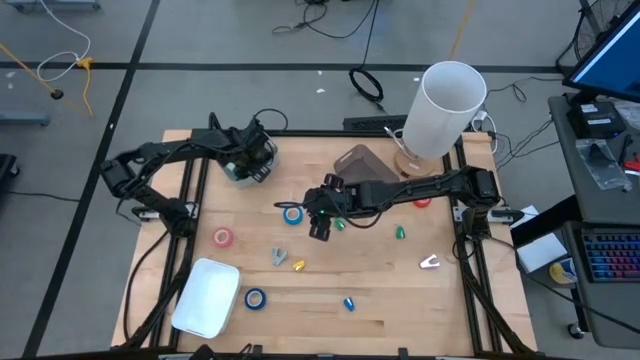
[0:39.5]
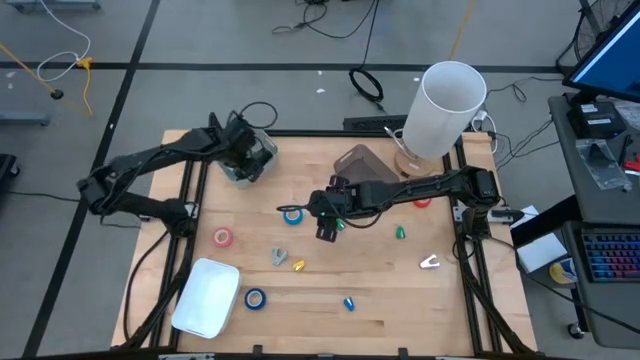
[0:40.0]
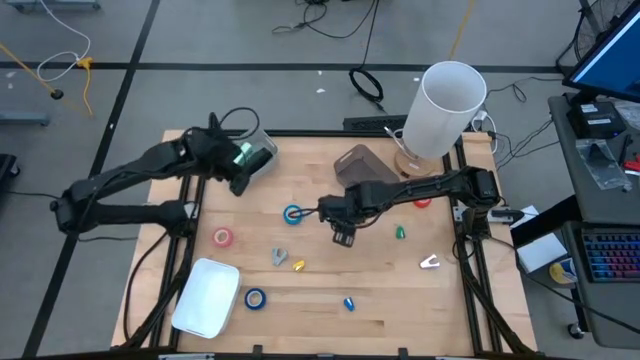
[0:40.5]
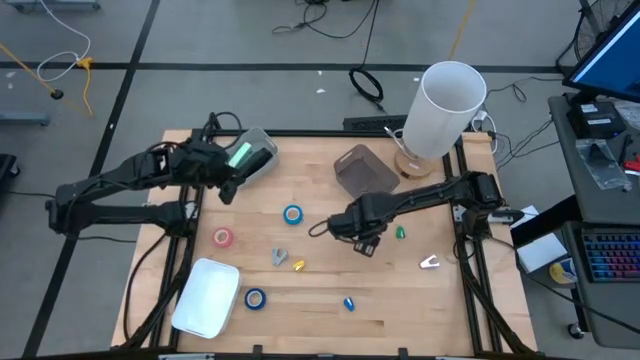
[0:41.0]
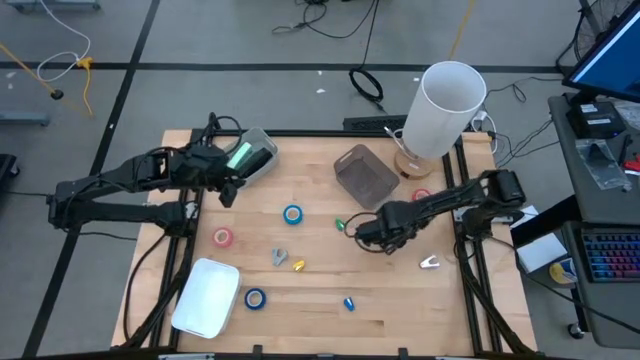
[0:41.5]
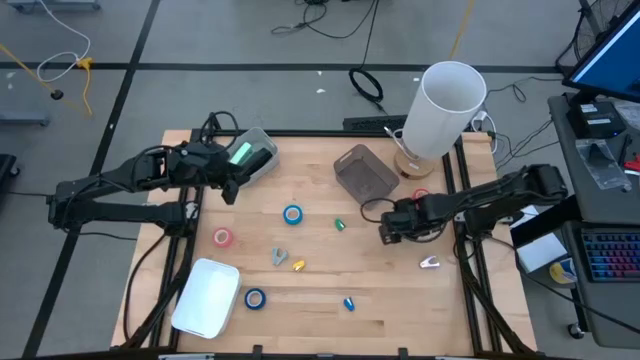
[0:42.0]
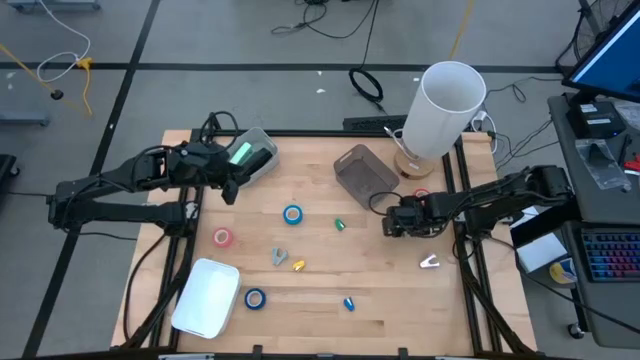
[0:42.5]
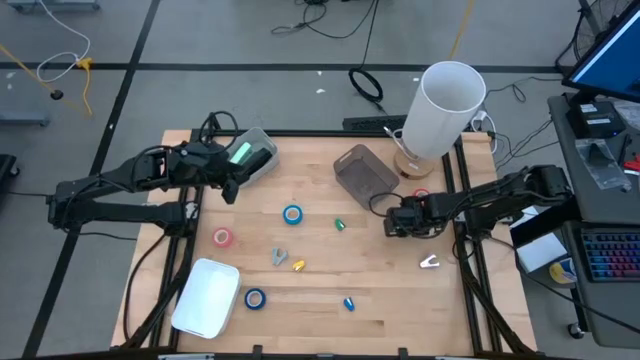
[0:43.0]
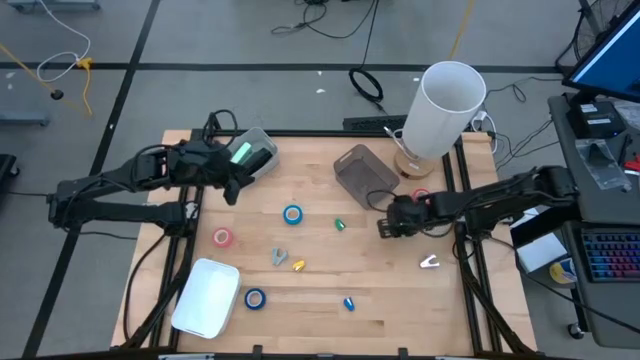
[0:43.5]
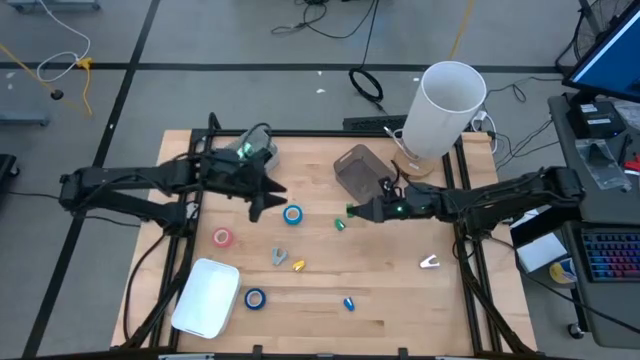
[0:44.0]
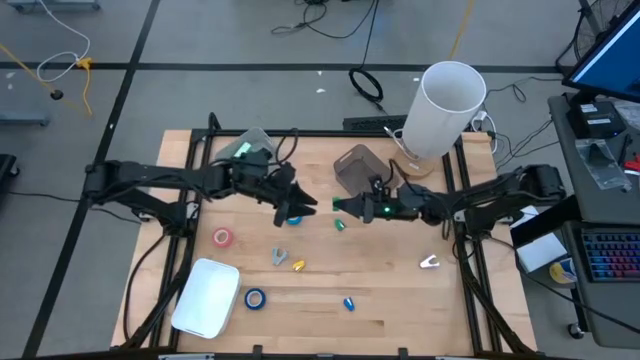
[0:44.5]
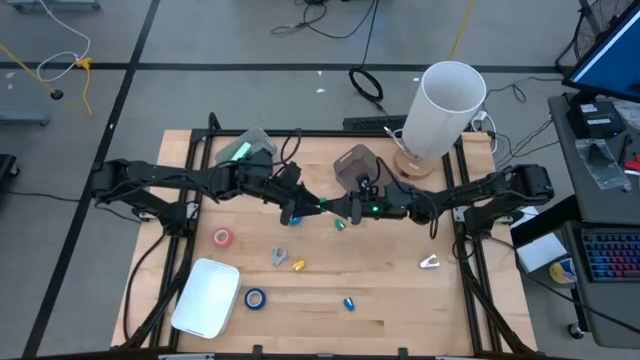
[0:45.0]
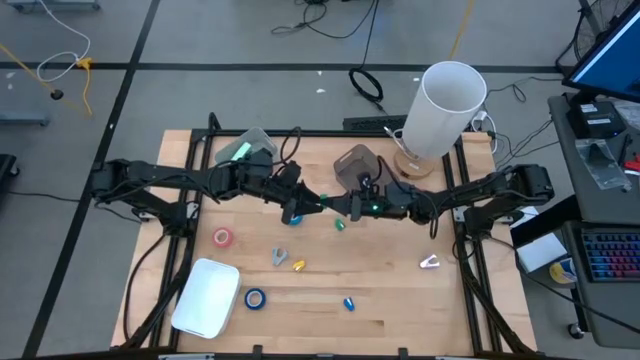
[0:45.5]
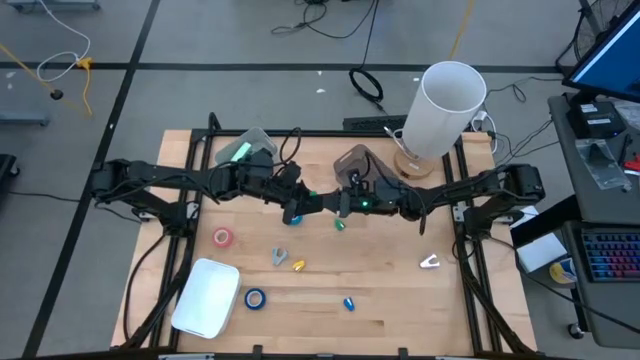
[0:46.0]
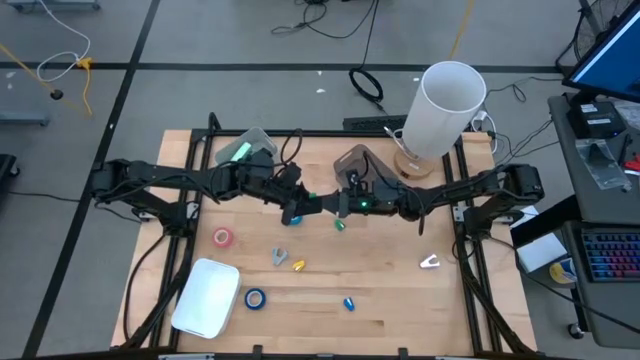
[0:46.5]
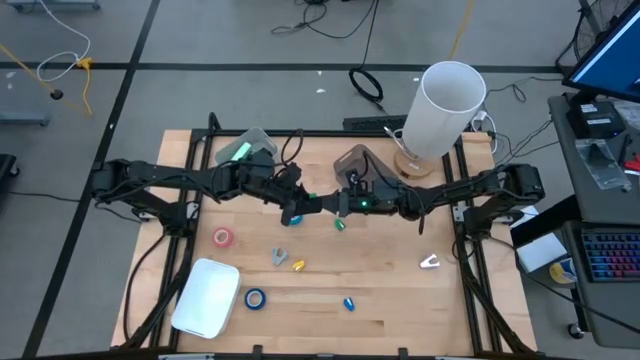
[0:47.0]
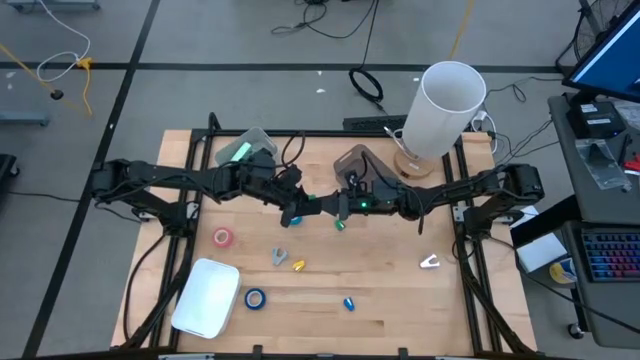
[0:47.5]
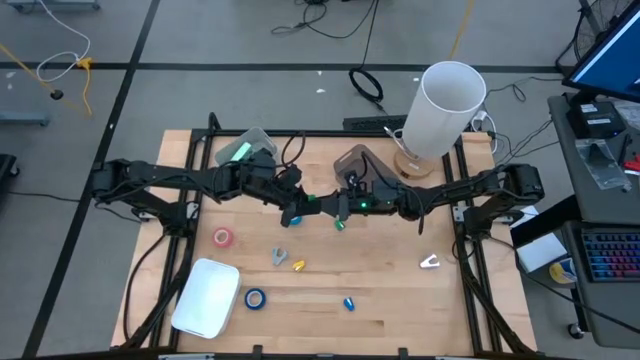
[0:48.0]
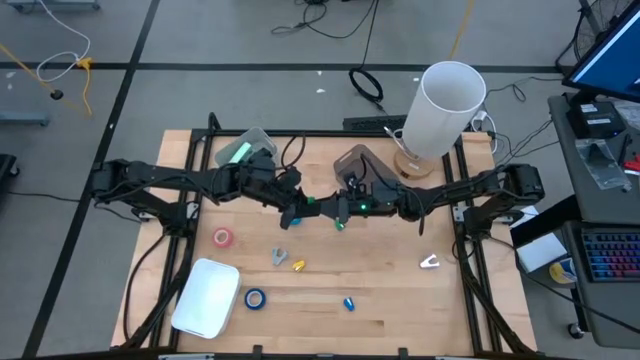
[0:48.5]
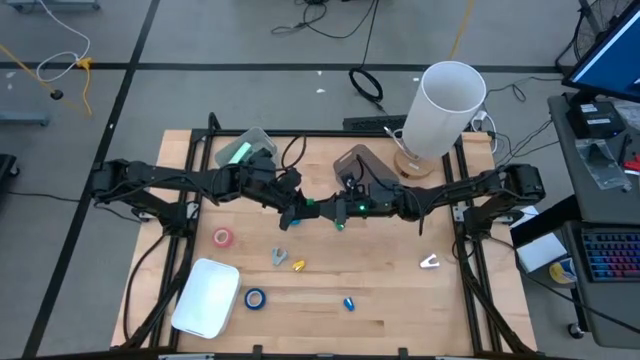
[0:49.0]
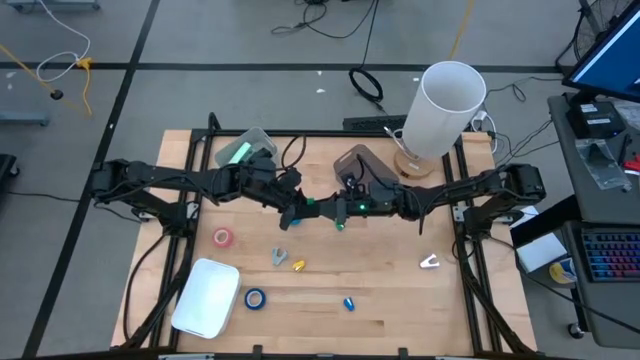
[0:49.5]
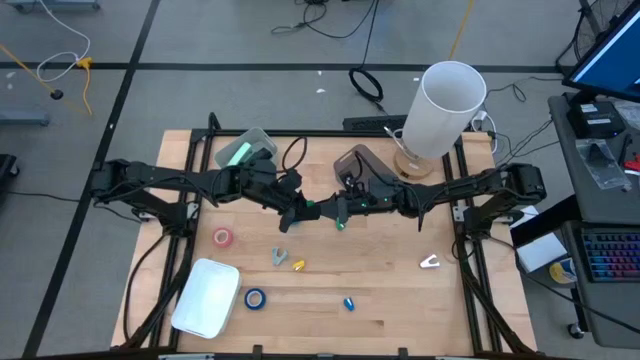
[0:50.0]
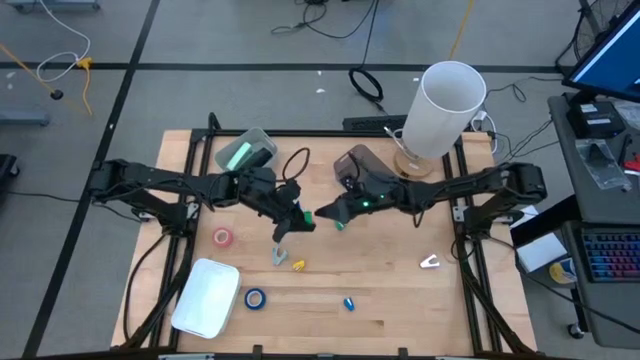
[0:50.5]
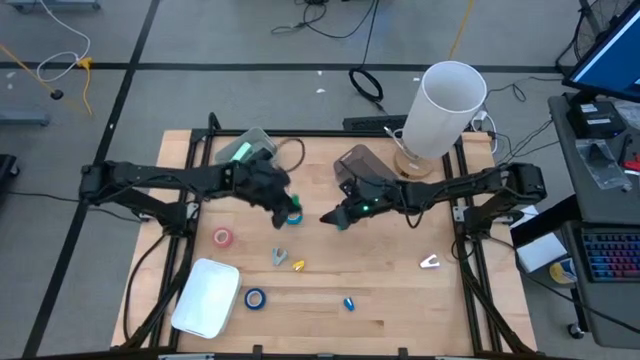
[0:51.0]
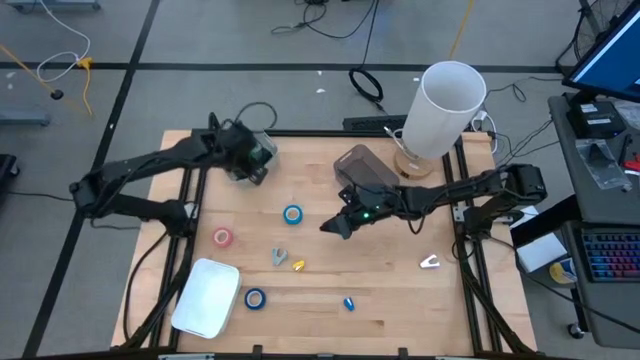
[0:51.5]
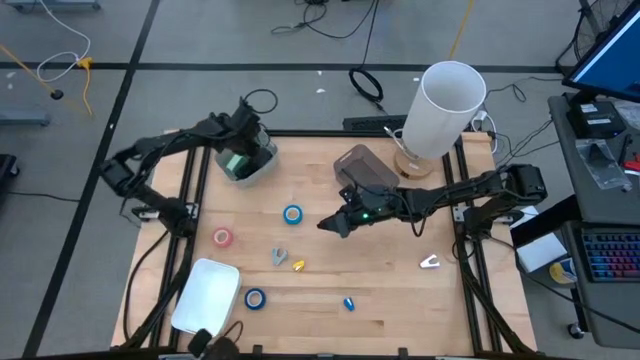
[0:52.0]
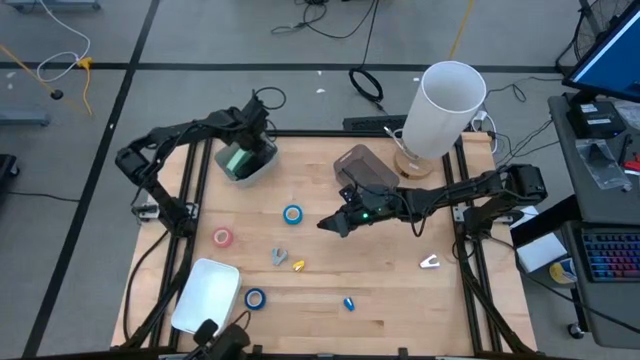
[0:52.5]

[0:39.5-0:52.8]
Task: Pick and place Stapler, Stapler remover, tape
Put the right green stapler into the gray bin

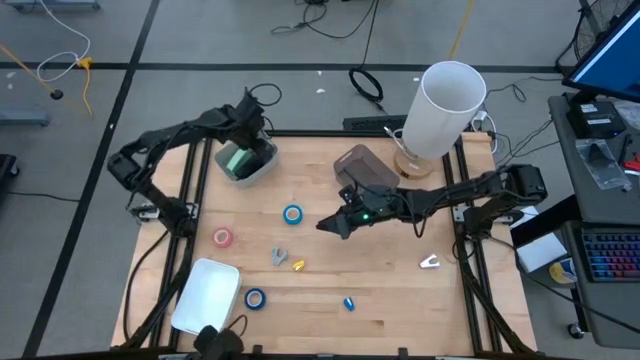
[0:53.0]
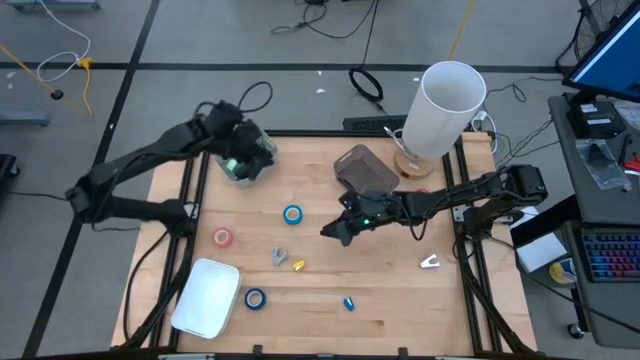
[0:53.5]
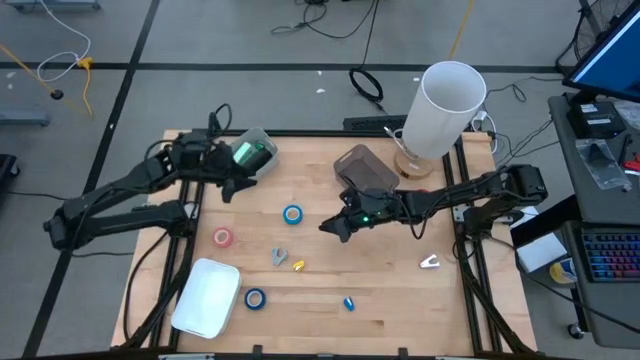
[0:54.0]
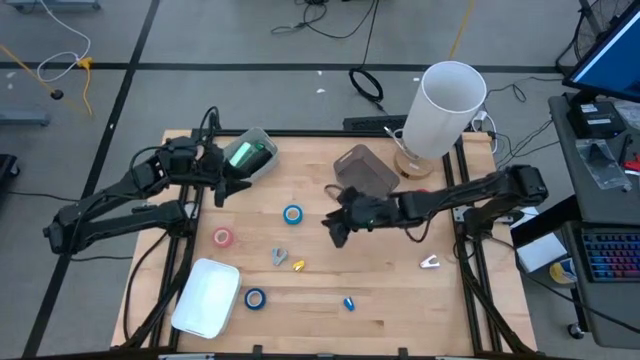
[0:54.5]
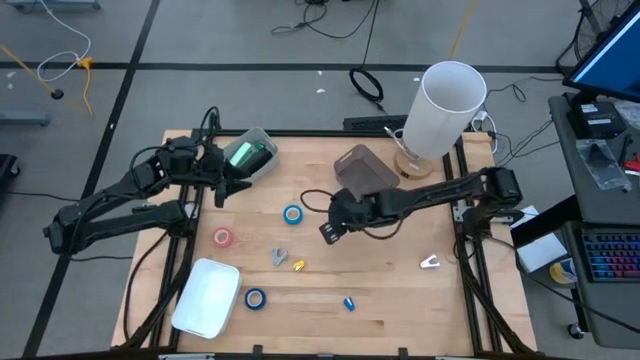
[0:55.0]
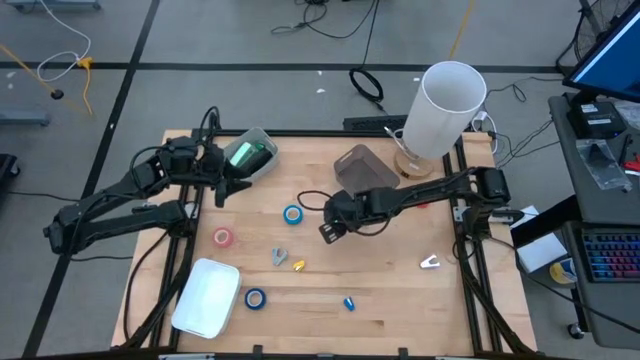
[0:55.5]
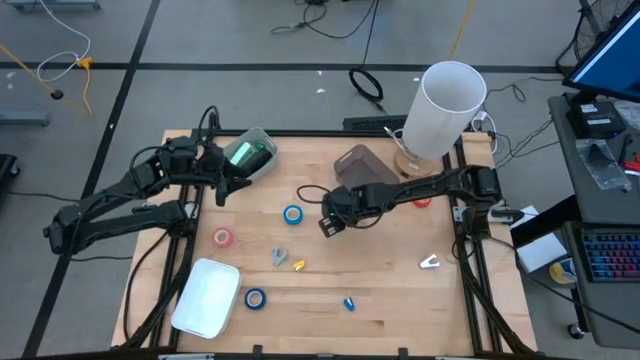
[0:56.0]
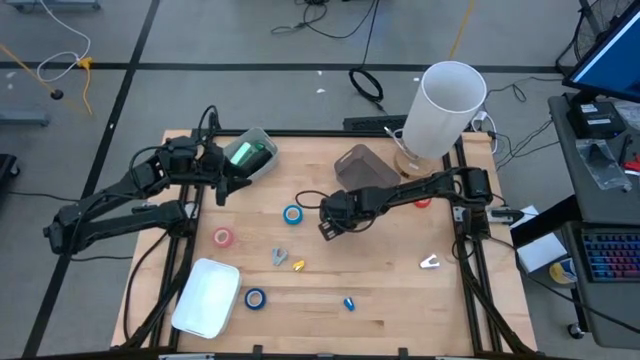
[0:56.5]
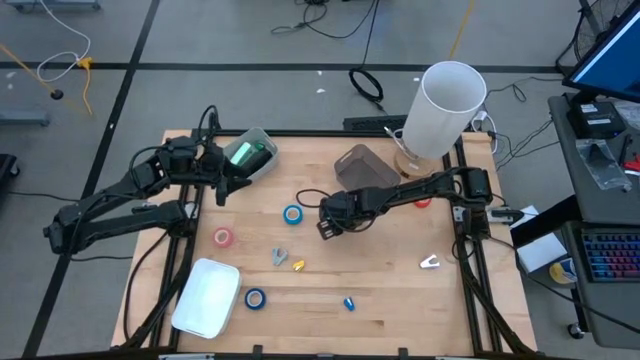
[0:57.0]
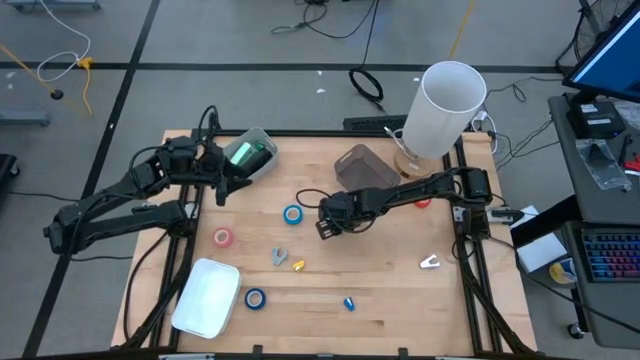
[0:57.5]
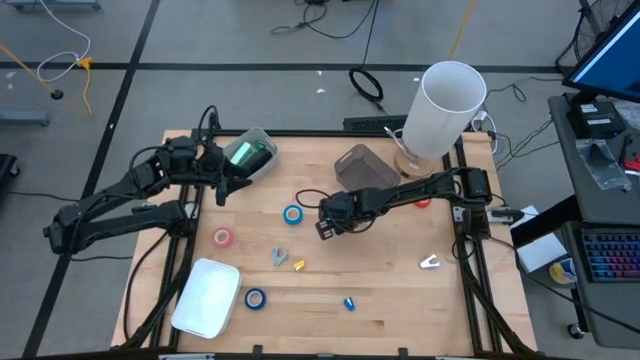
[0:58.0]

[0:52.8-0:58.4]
Put the green stapler into the gray bin

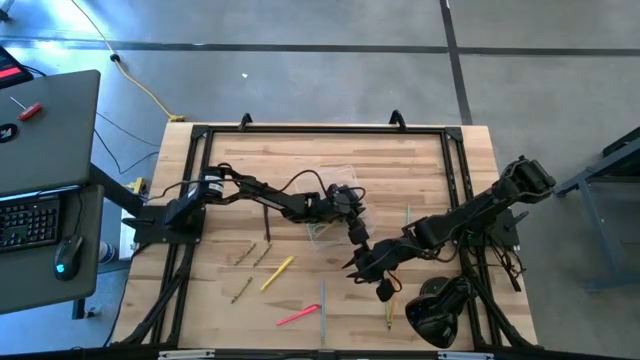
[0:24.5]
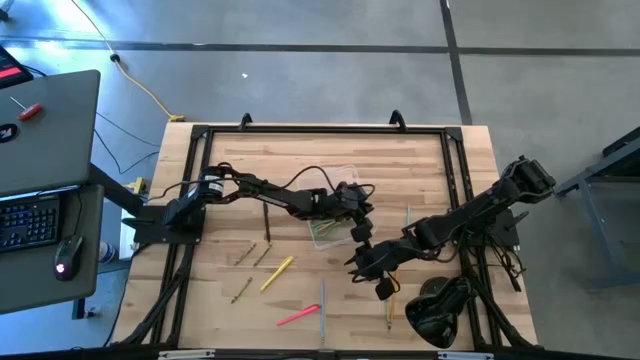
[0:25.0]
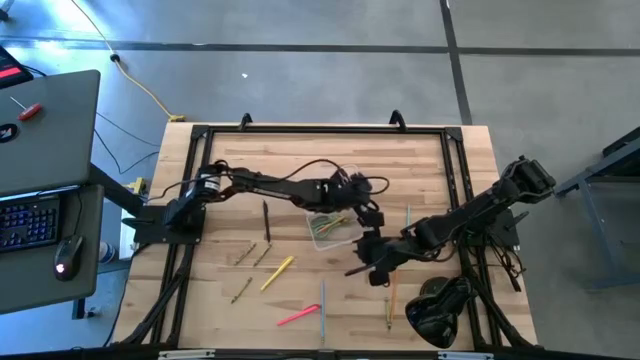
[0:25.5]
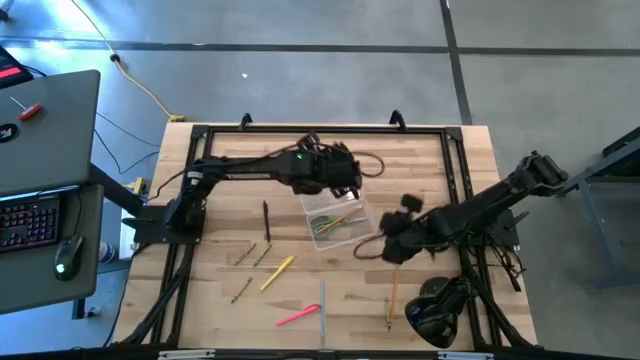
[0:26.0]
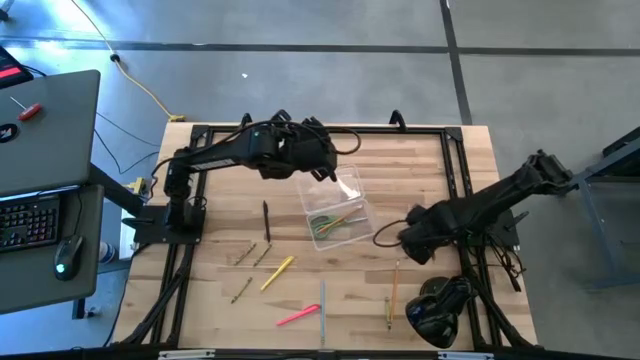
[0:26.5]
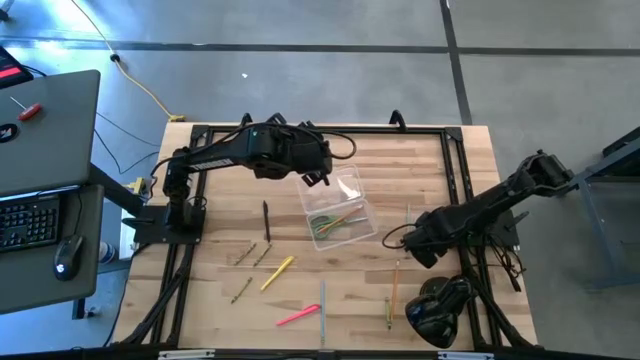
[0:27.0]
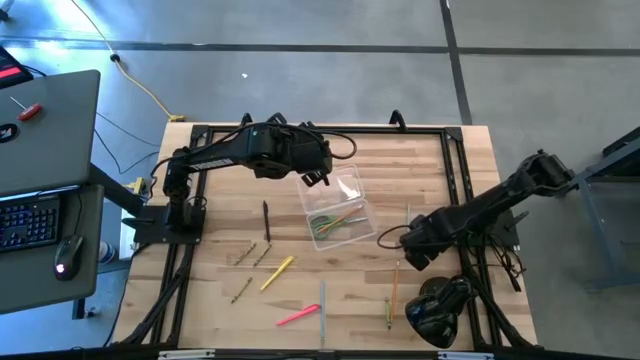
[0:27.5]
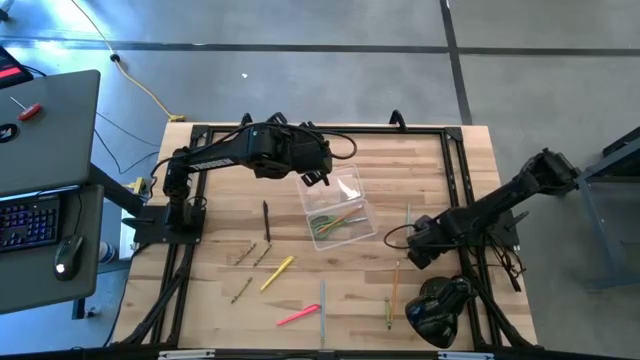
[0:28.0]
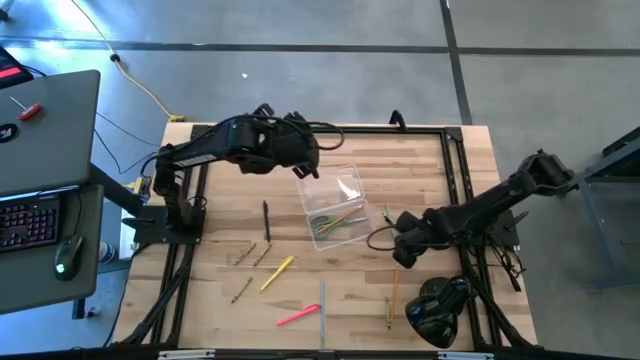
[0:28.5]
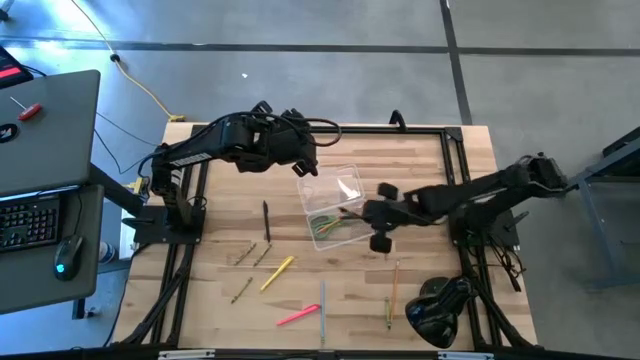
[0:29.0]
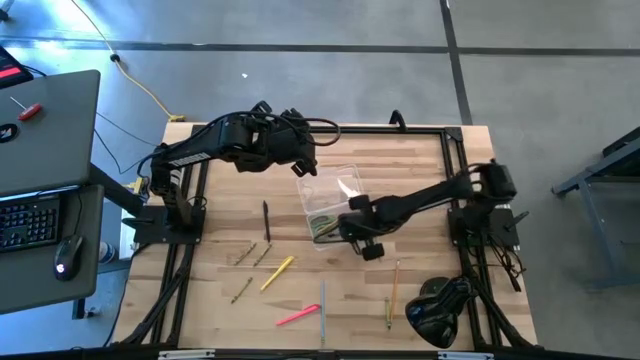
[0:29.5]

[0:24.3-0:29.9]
Task: Pick & place school supplies into a supply box
Put the black pen into the supply box
